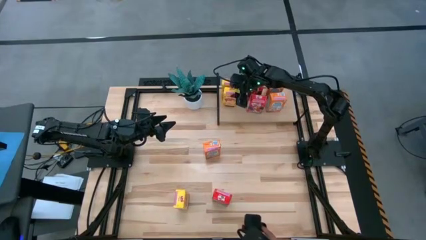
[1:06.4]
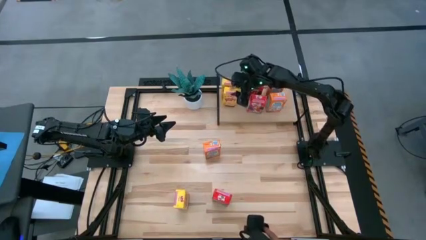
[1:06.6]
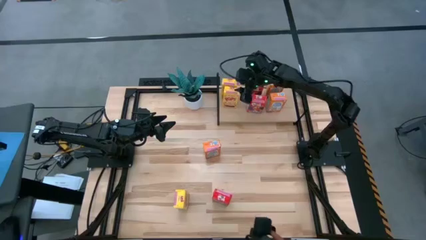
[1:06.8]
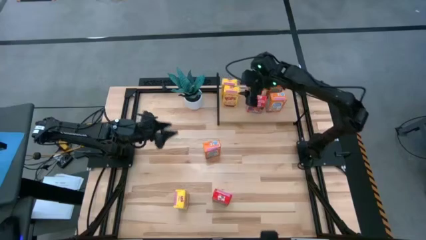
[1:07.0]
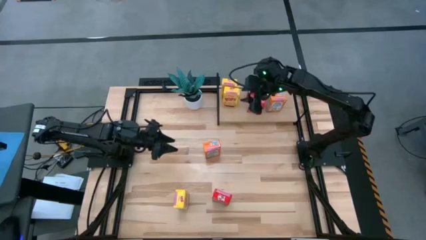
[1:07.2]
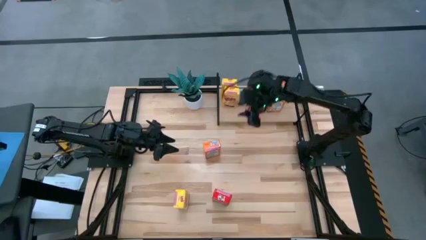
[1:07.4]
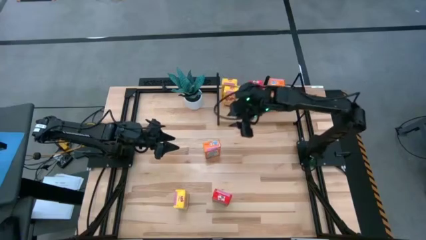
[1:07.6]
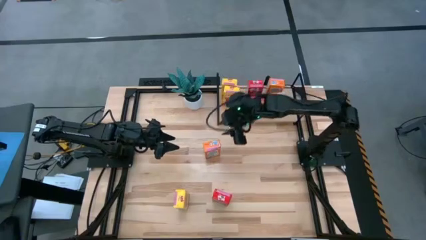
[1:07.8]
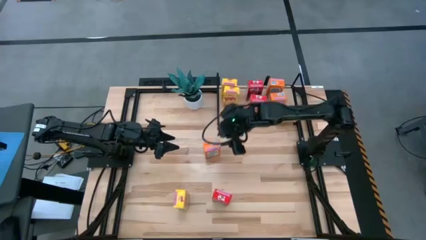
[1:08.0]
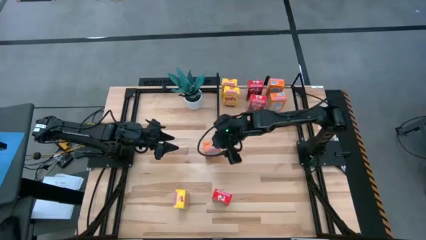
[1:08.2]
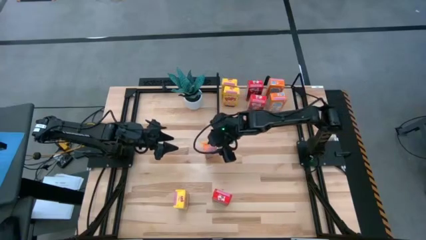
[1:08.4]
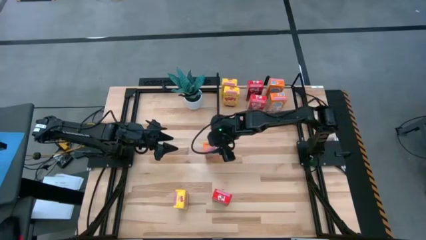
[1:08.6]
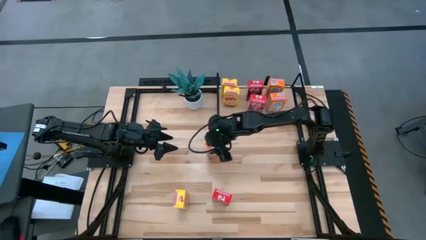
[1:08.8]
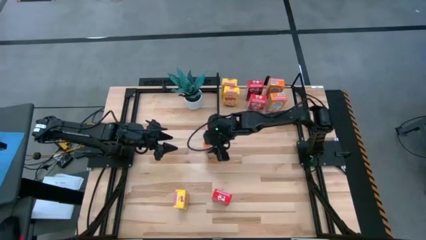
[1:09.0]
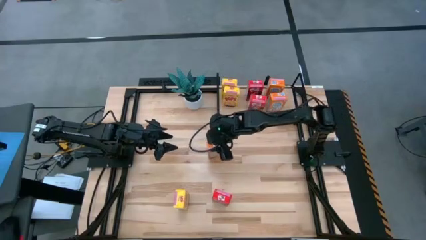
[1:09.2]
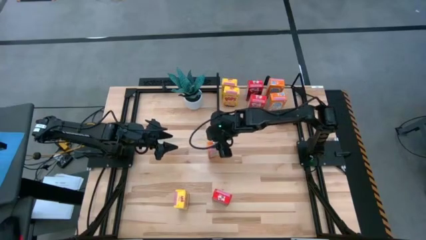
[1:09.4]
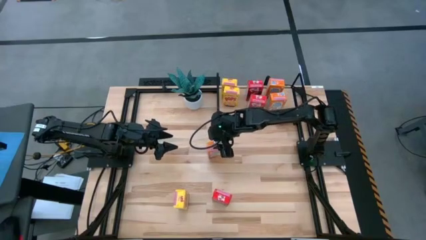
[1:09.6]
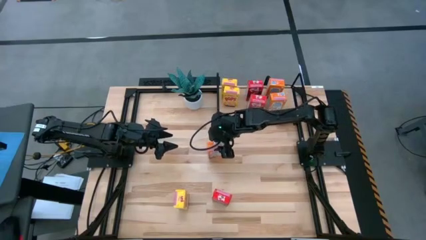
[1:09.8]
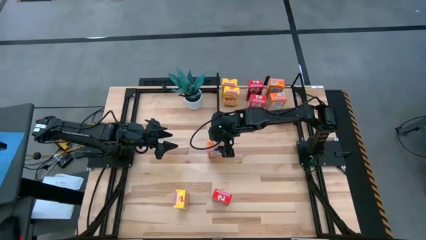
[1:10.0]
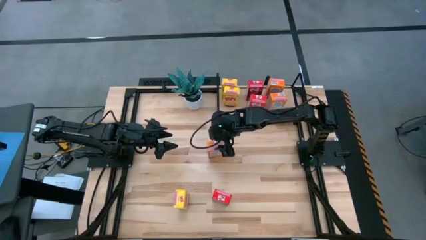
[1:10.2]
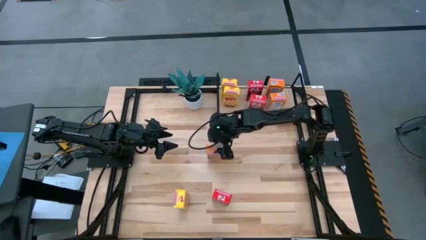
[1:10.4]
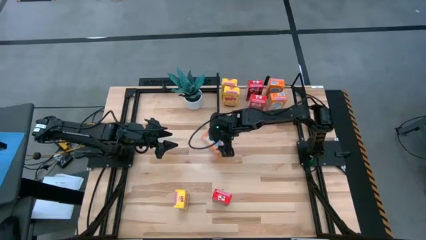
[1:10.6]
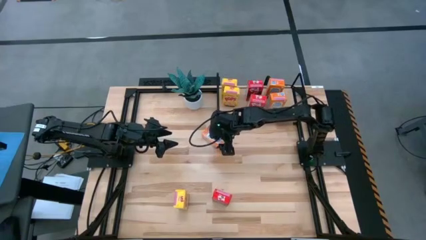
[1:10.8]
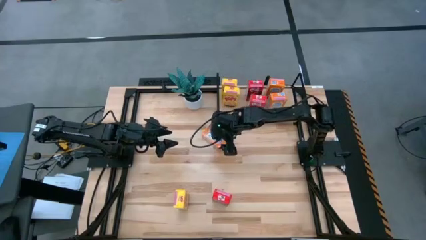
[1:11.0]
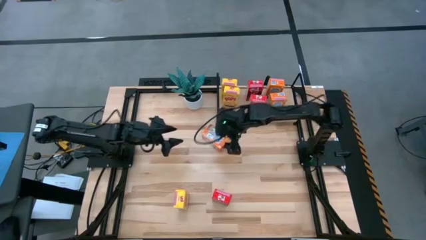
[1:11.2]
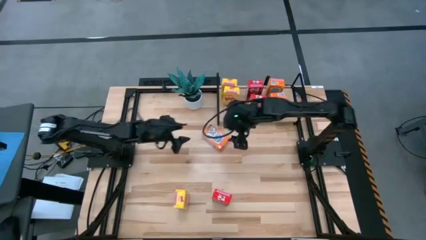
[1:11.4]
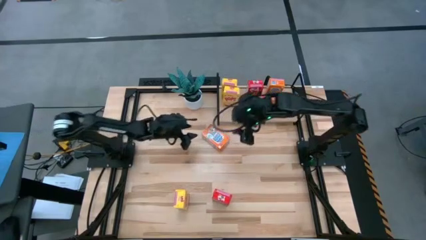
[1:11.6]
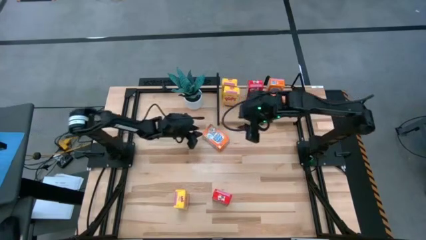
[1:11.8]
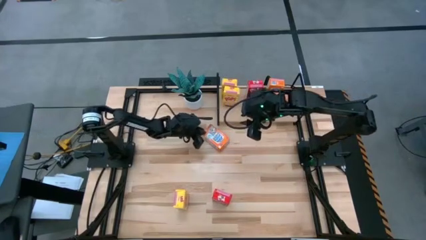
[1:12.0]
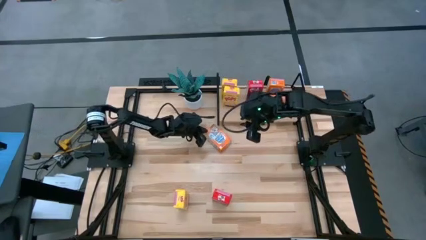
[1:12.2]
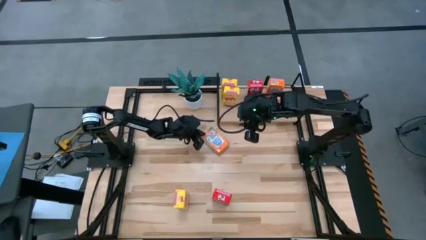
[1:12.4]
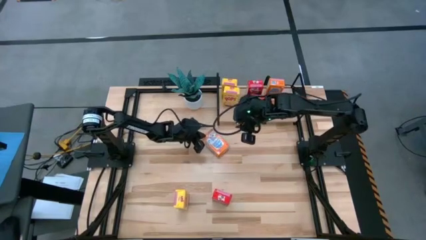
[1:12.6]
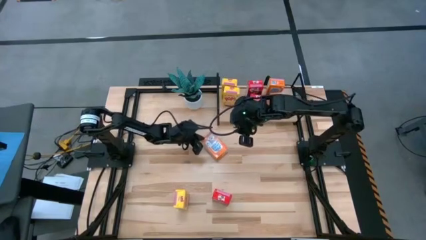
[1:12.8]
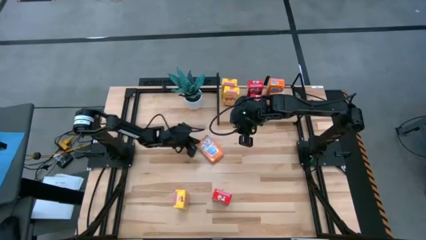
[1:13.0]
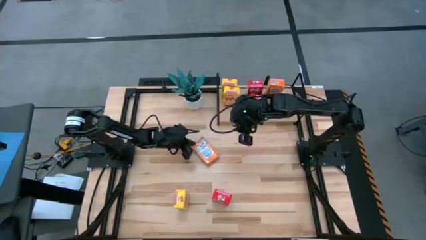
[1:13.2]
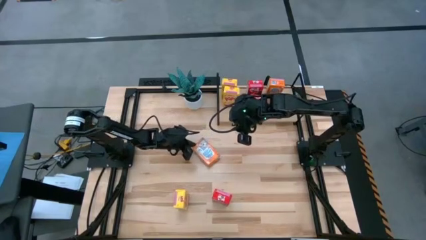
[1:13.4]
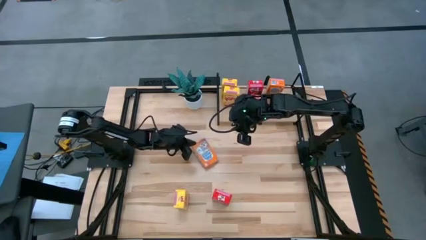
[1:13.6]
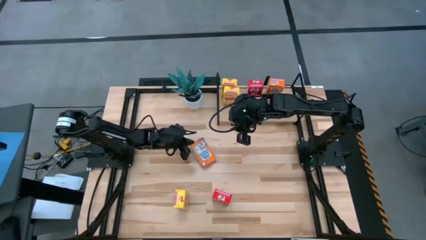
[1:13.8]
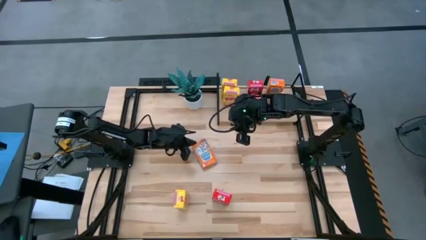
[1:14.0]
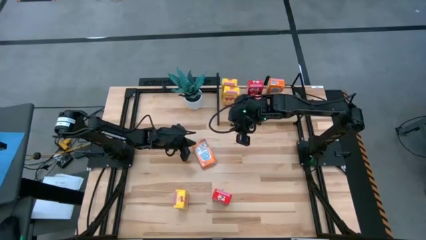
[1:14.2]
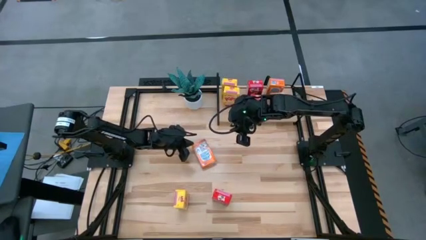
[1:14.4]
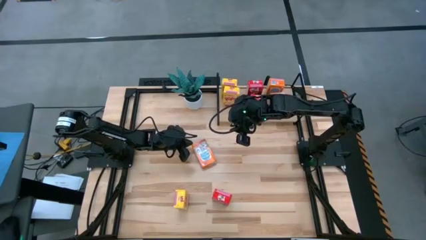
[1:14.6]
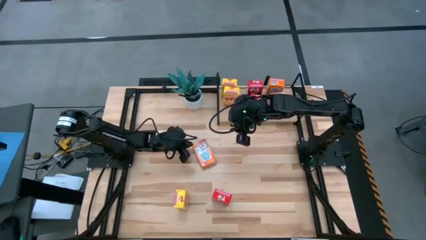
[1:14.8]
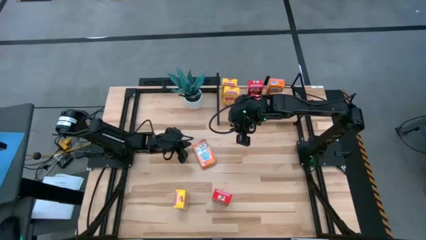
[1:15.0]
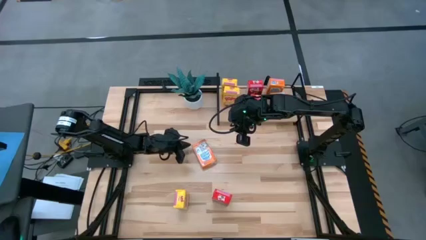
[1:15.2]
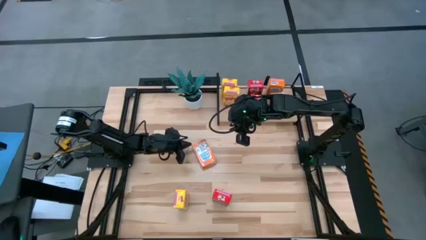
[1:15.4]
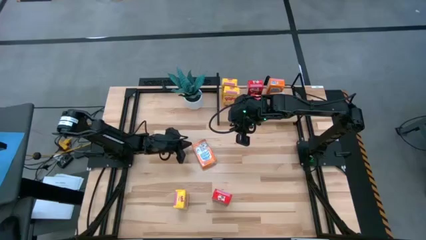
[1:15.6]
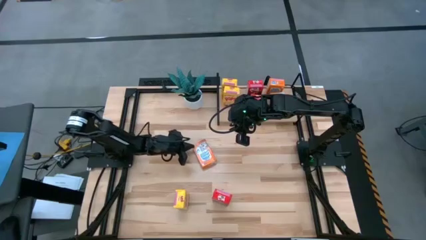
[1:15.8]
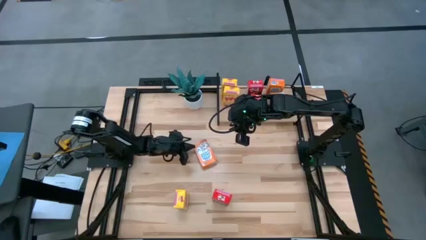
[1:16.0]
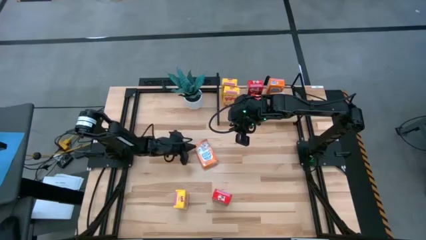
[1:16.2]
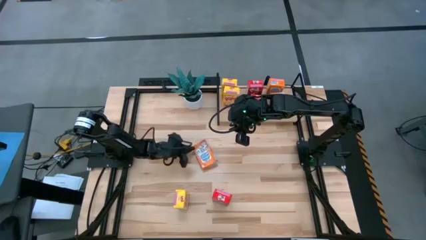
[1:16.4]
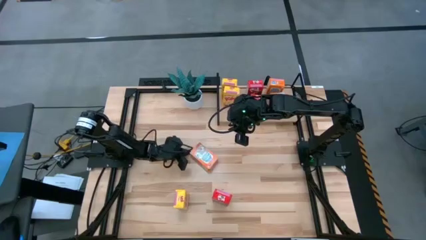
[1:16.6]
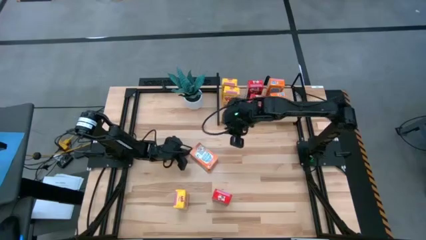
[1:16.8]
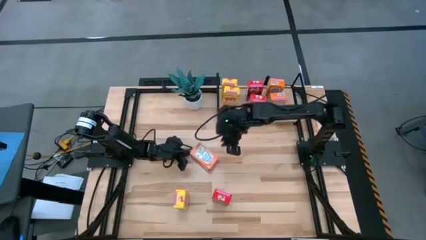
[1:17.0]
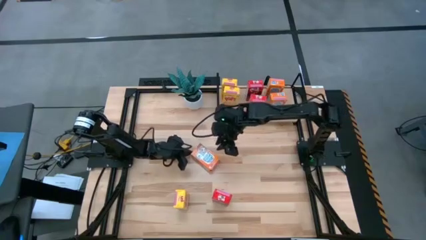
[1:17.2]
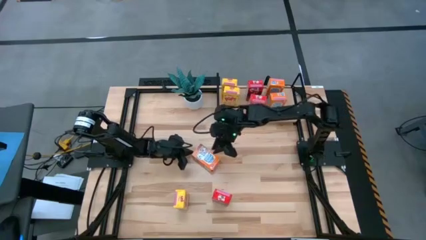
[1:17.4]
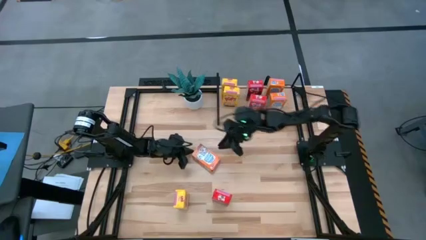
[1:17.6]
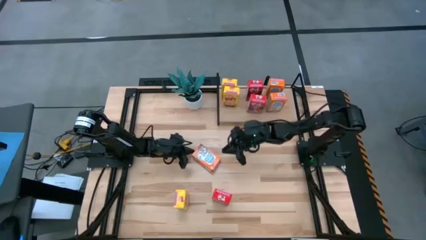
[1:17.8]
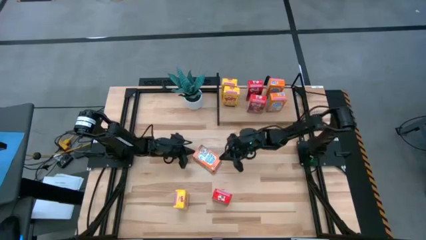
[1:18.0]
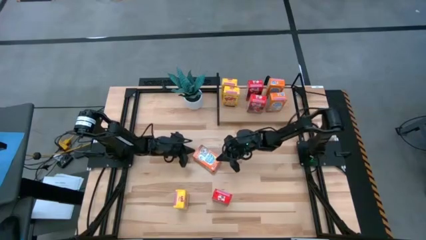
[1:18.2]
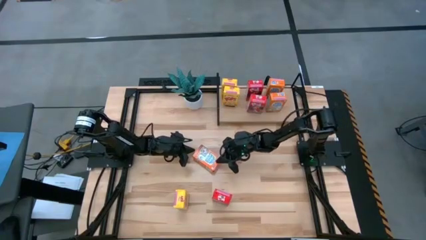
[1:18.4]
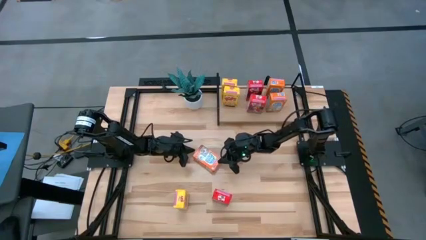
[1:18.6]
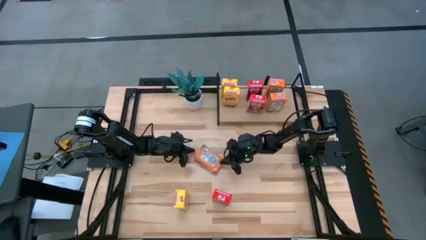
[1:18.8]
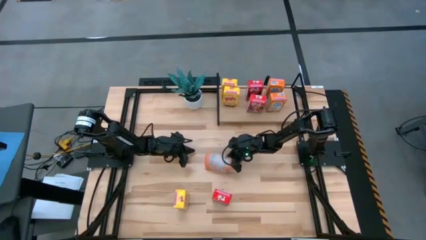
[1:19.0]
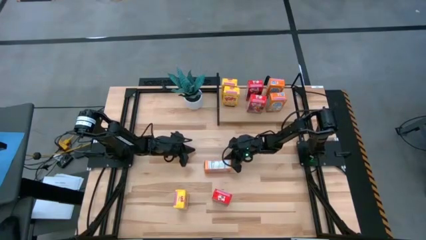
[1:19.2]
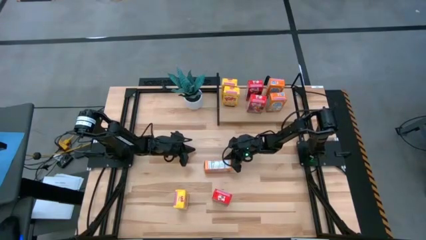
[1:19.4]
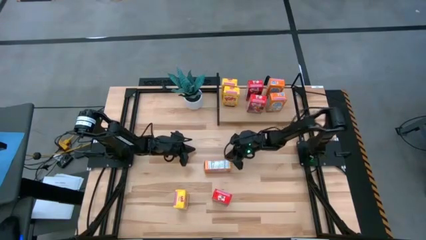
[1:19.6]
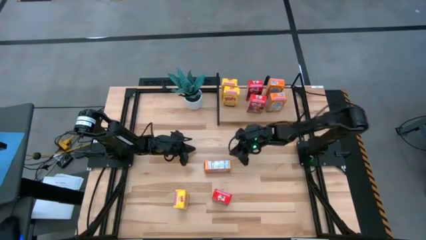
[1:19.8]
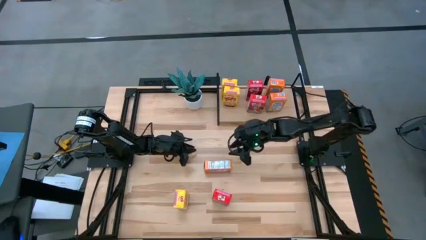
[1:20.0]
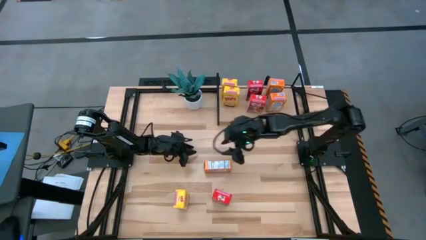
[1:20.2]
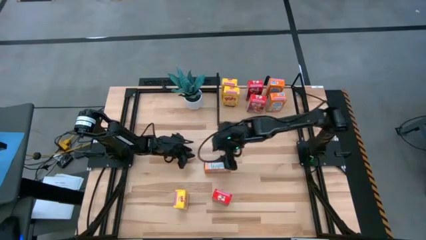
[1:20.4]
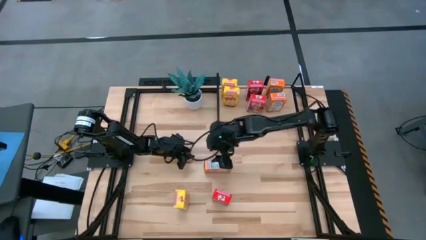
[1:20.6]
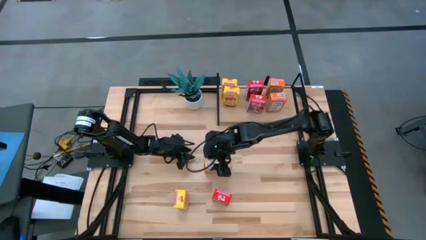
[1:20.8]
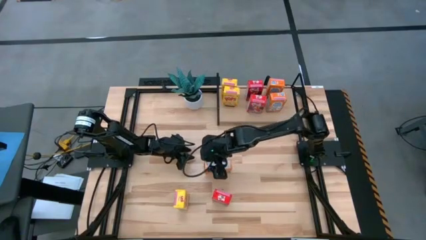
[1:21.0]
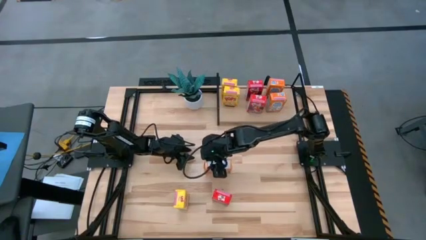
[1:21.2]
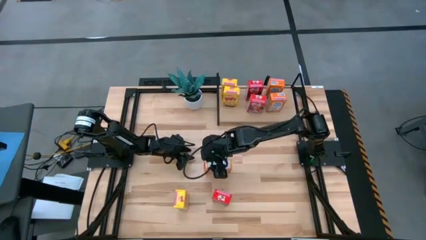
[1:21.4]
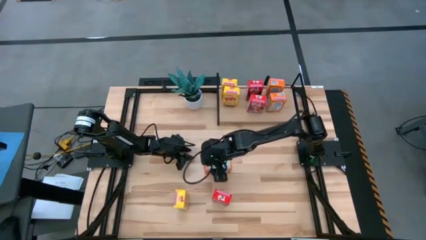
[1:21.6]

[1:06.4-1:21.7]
Task: Stack cereal on shelf
Put the orange cereal box on the shelf aligned with orange cereal boxes

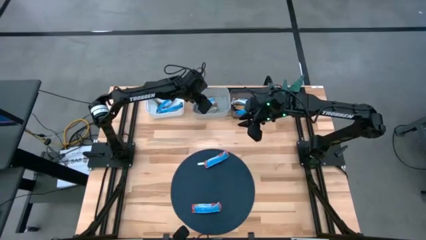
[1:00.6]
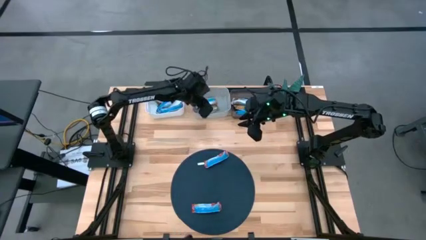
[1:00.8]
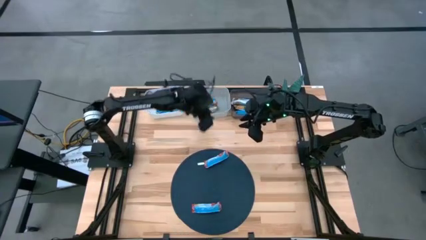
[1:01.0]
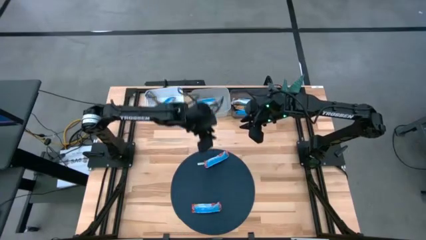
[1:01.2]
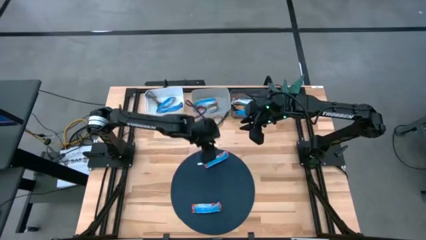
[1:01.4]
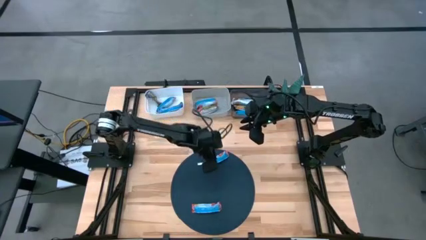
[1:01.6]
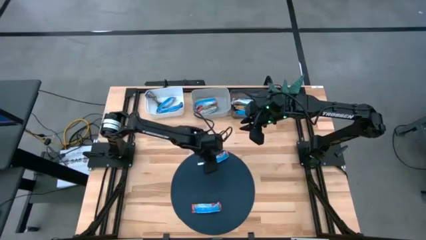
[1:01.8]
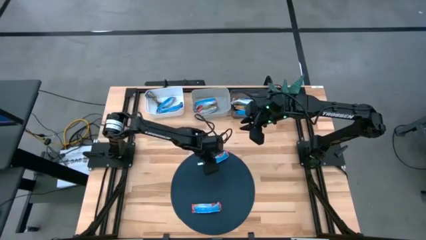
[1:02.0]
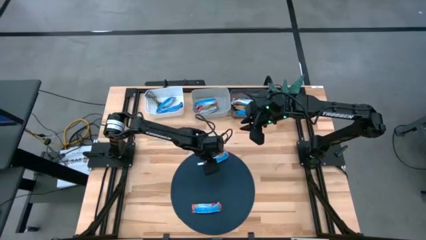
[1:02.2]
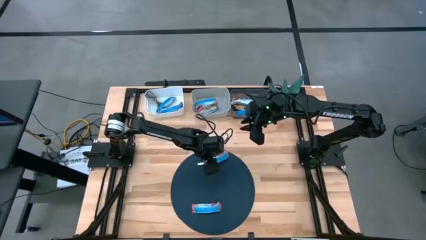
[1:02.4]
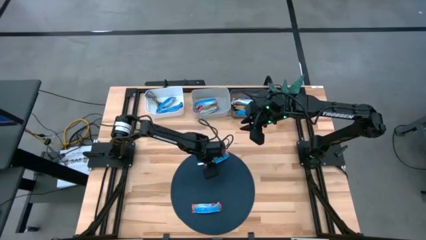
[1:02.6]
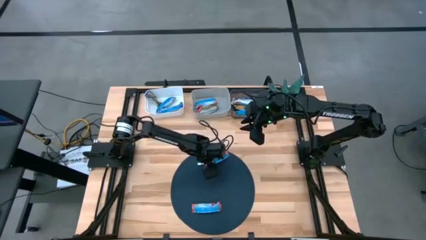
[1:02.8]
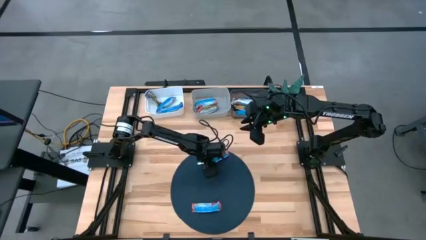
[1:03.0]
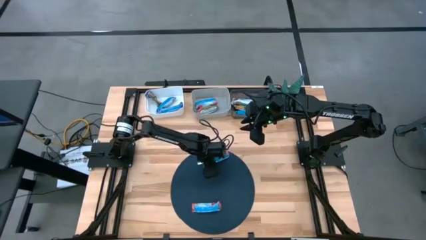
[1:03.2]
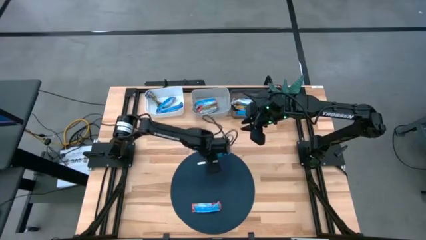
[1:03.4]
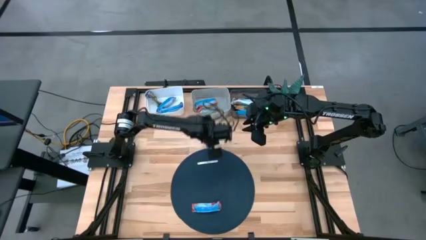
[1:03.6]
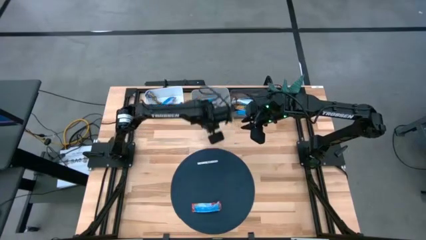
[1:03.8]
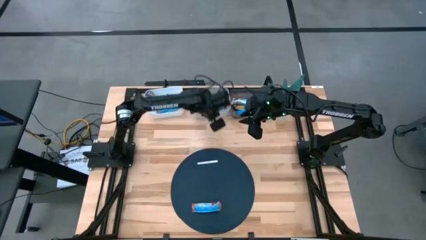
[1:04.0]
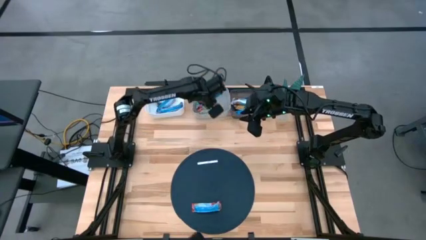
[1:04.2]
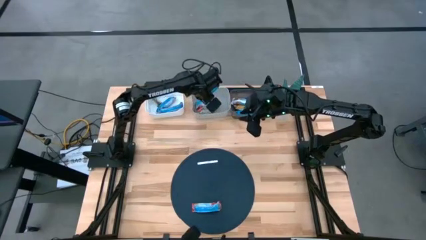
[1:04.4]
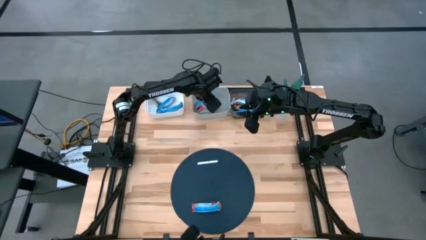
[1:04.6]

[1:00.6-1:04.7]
Task: Pick and place Granola Bars by type
Put the red granola bar into the gray bin
